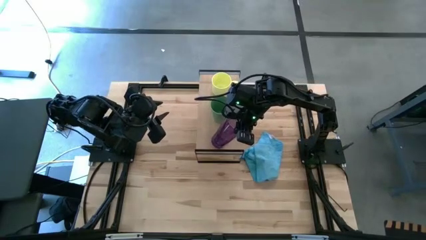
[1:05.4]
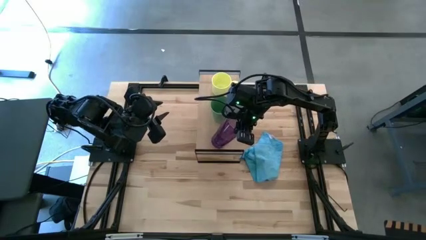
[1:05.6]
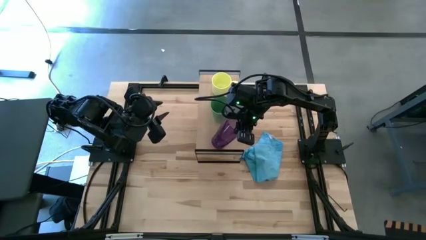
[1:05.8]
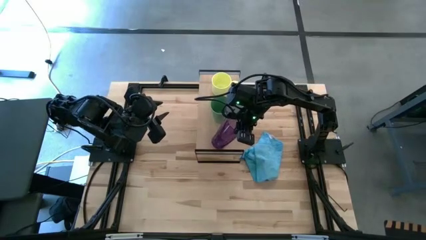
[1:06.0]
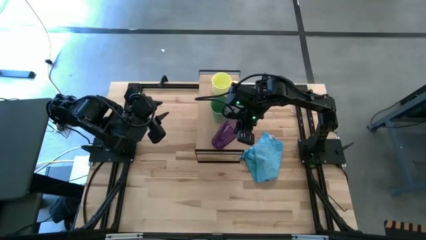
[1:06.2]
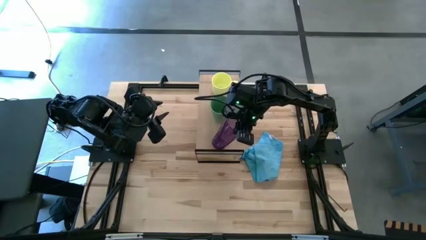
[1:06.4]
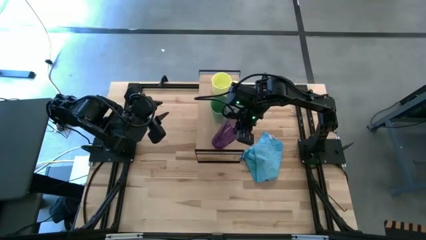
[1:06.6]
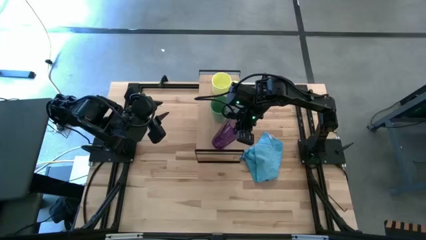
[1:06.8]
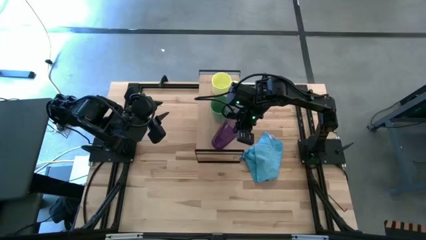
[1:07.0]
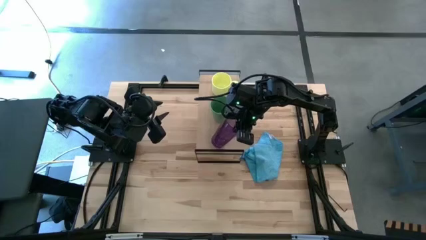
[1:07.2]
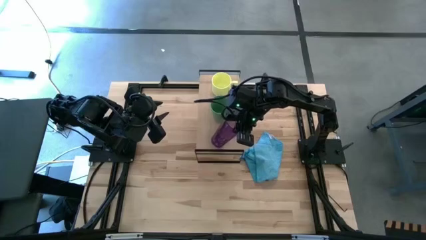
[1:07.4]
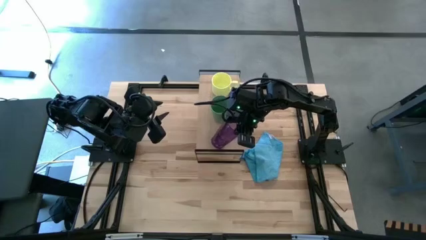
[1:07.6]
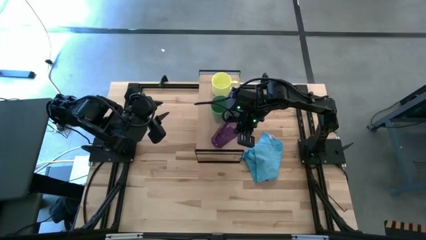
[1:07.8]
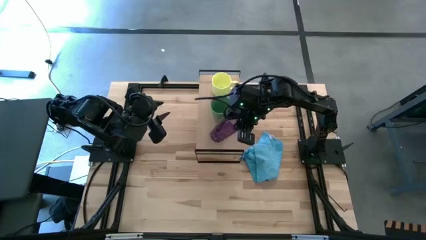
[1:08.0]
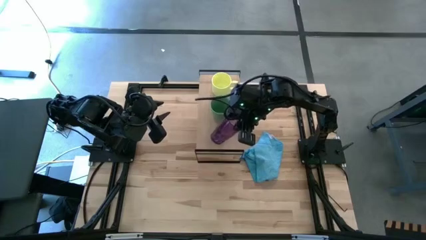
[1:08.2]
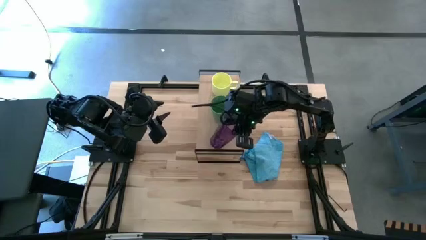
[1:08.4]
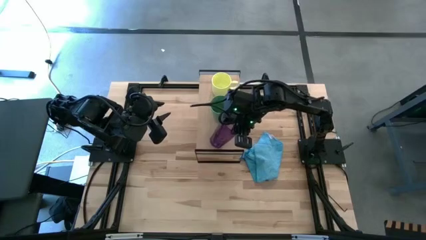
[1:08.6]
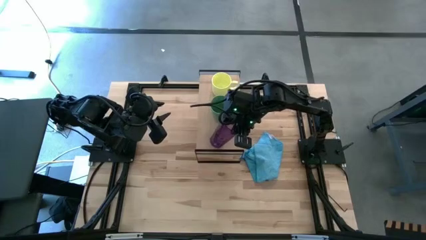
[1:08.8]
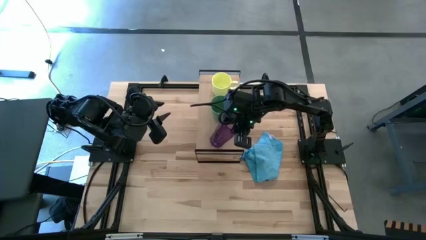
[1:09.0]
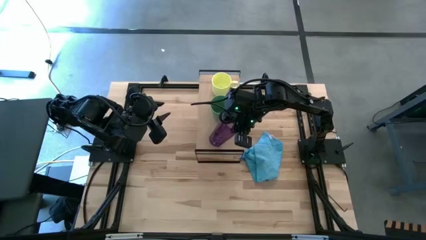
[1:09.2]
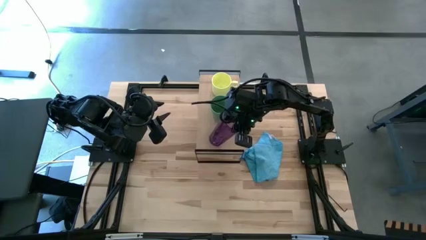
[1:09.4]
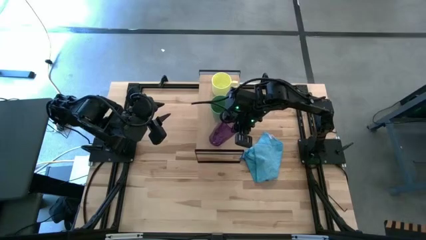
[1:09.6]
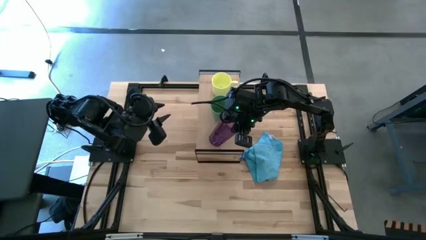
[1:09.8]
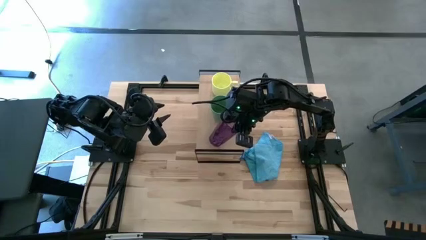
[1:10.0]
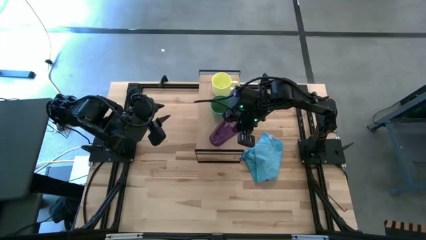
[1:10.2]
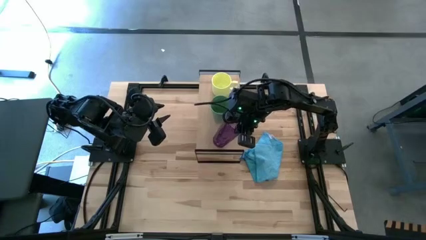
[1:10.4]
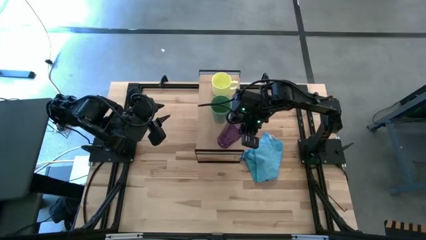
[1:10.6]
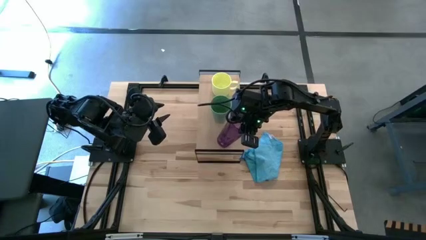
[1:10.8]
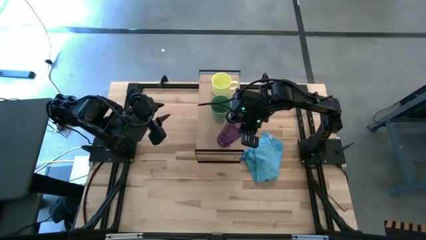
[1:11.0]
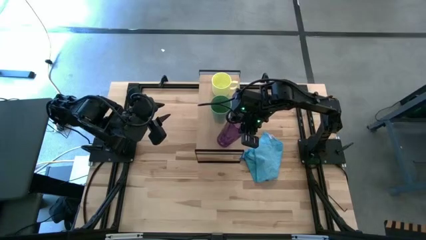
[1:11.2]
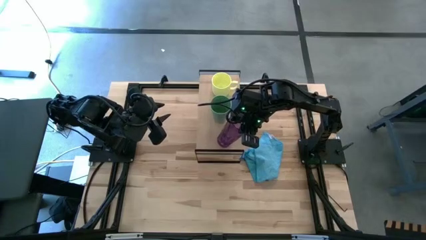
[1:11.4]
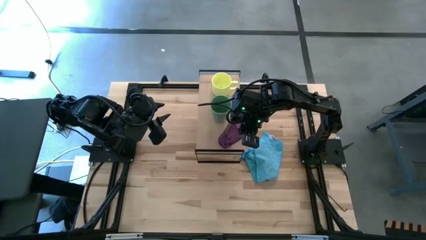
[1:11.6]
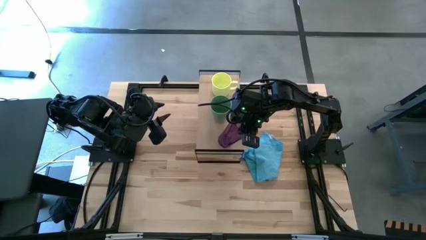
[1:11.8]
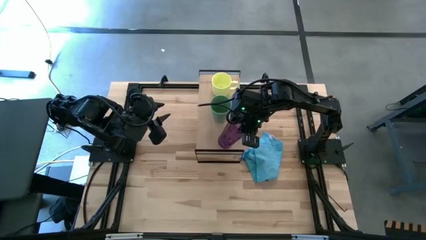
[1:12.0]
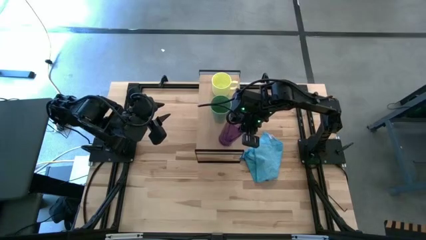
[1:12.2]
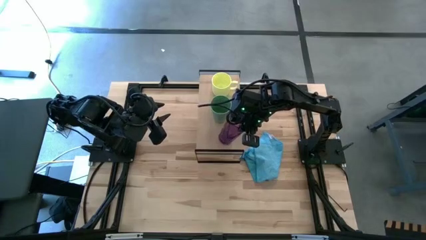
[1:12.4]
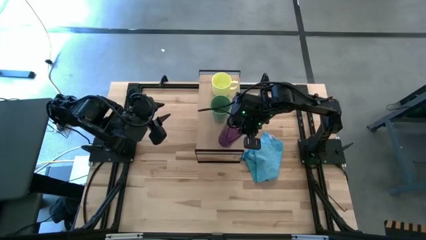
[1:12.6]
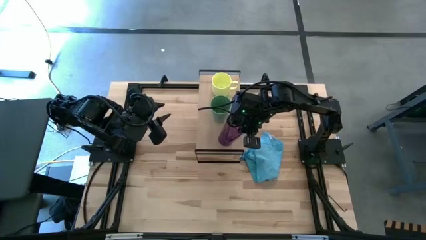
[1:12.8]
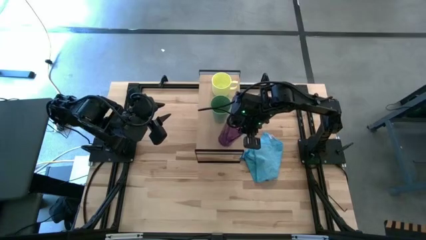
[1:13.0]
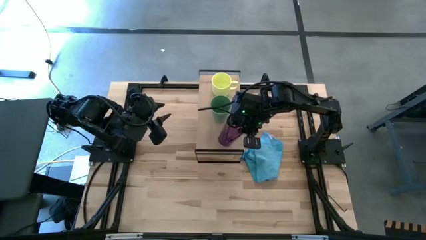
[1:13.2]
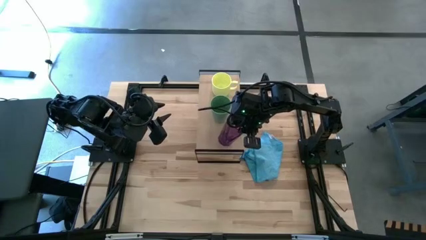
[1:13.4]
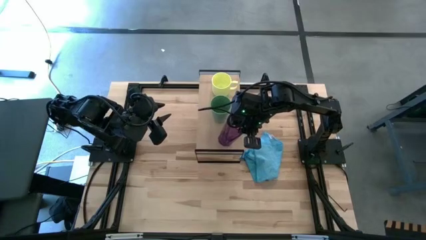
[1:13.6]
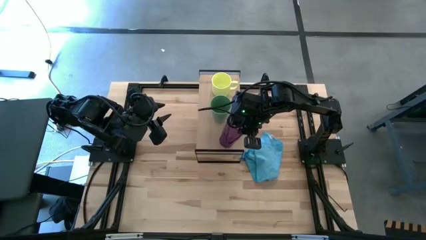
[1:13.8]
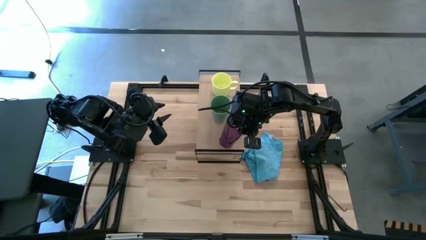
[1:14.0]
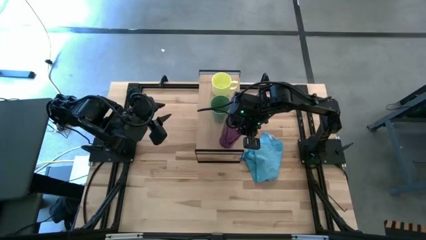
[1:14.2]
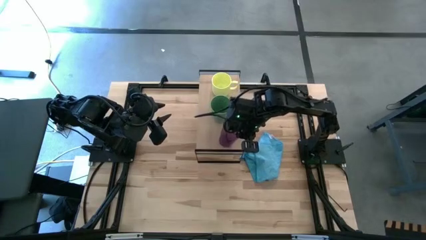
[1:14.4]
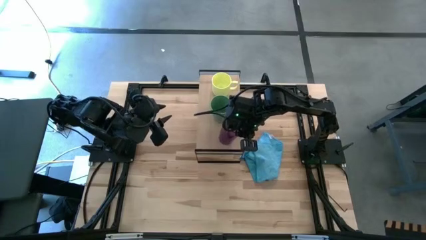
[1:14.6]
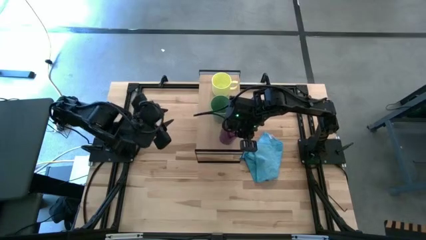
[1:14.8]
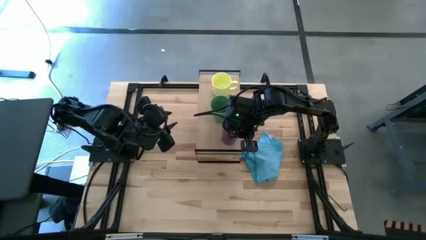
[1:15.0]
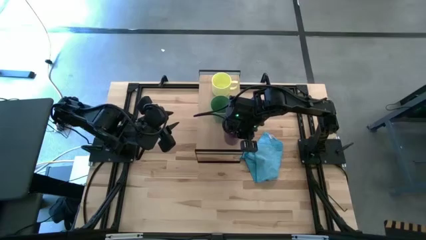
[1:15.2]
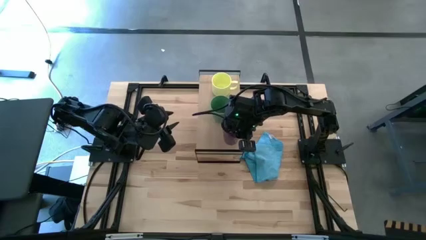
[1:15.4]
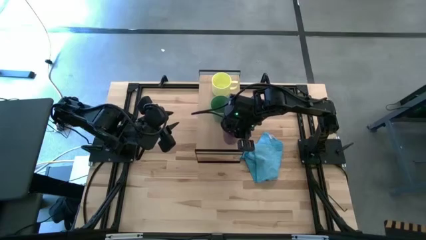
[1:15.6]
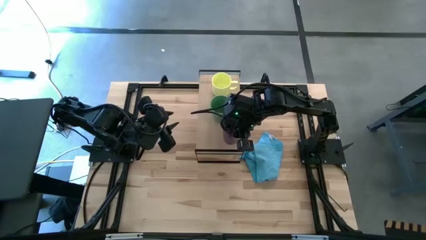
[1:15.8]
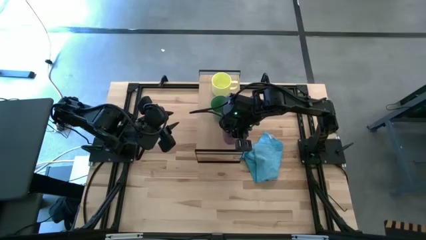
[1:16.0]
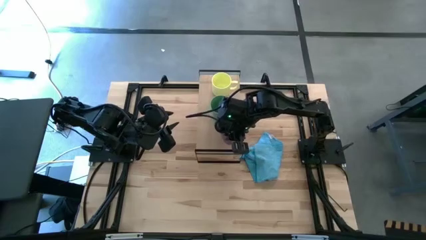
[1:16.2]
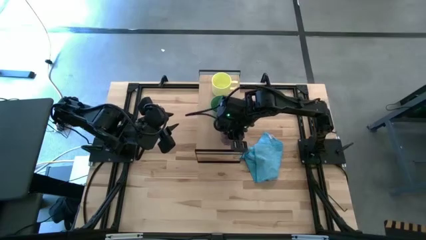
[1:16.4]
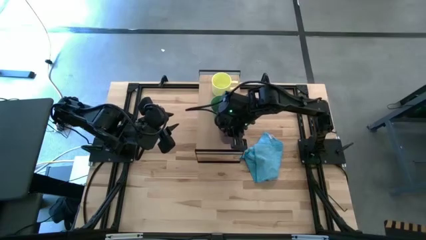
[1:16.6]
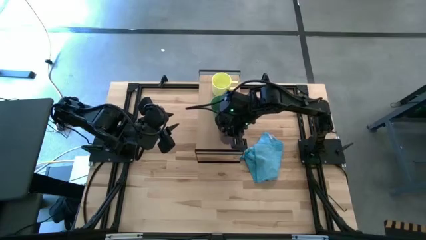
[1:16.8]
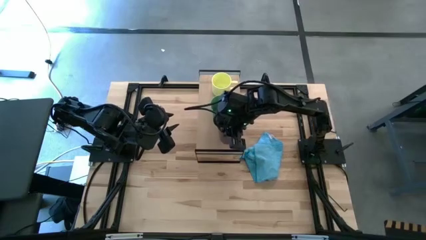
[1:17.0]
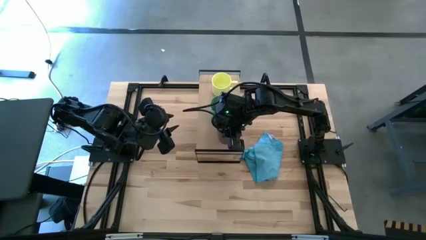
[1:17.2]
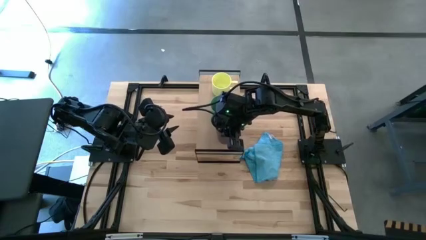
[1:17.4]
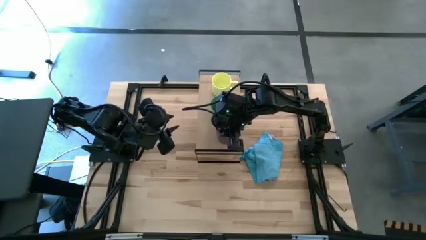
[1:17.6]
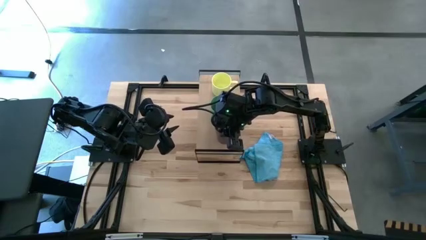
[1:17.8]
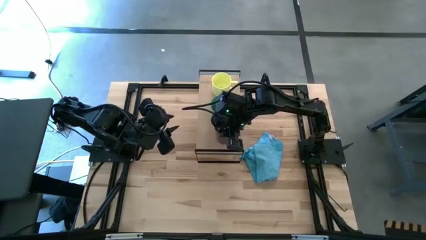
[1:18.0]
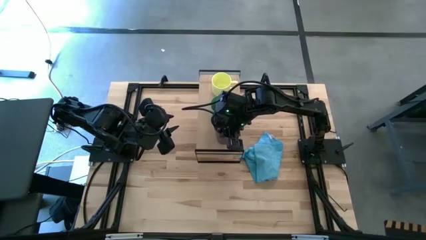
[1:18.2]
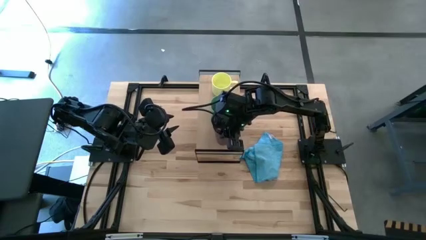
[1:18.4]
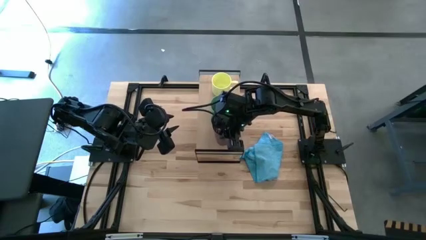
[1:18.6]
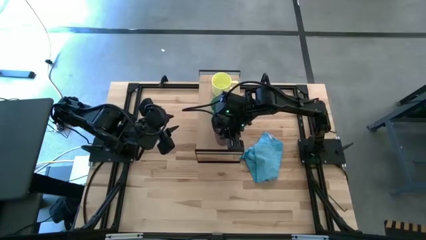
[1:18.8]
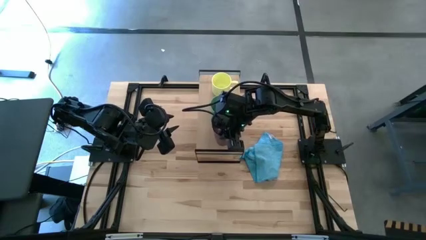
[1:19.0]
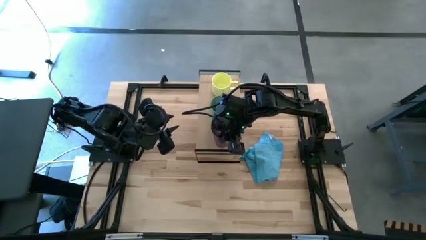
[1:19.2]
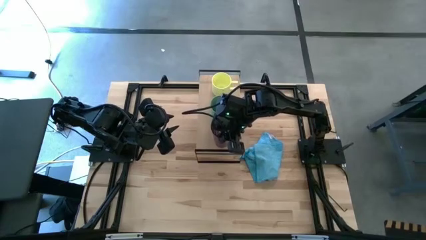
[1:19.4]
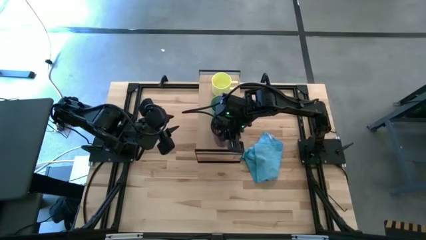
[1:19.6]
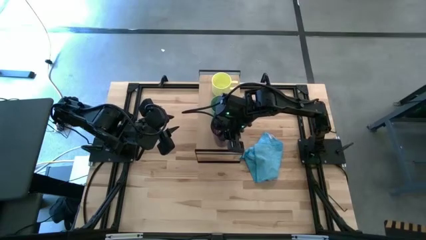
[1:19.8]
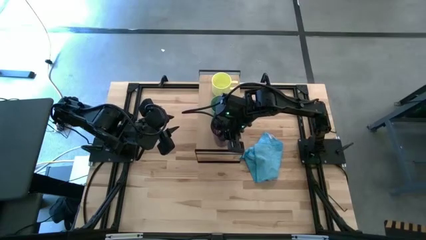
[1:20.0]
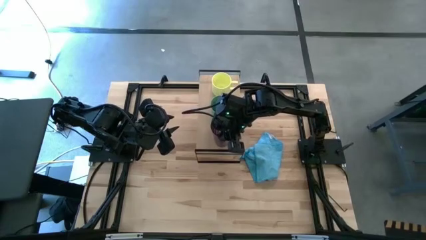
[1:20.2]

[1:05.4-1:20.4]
Task: Stack small to large cups/mugs on shelf
Put the purple glass on the shelf

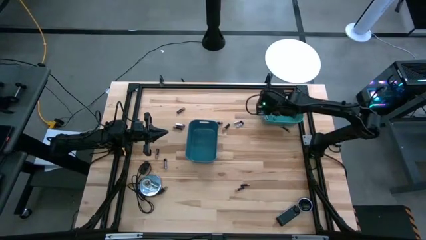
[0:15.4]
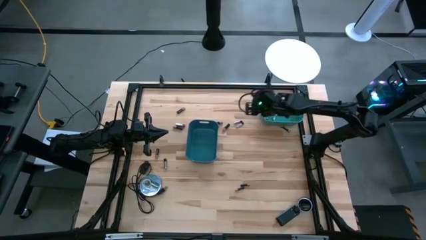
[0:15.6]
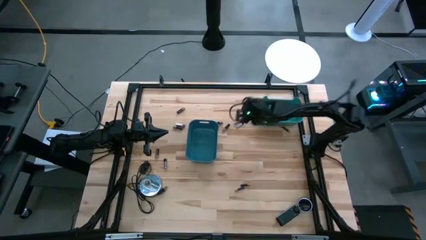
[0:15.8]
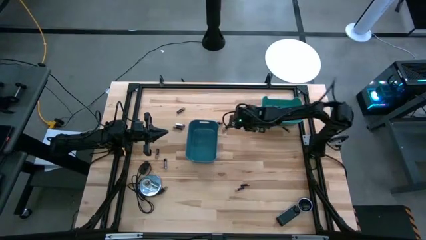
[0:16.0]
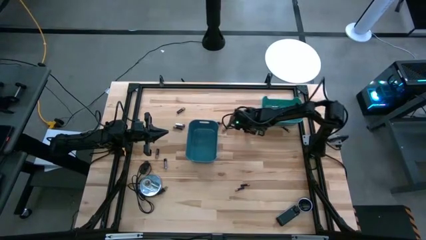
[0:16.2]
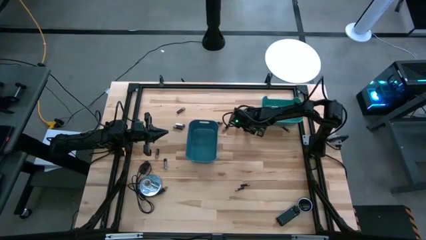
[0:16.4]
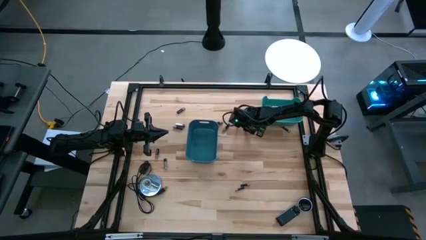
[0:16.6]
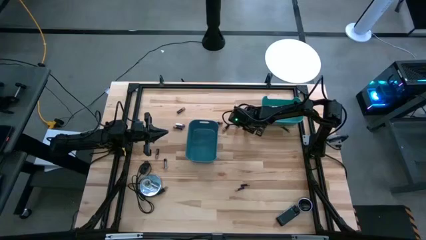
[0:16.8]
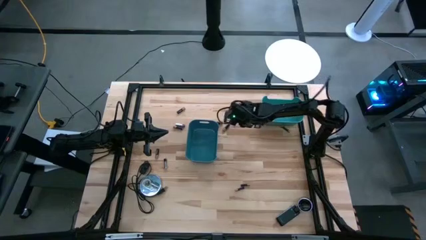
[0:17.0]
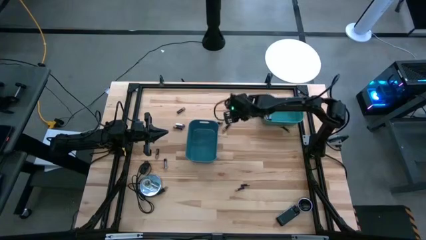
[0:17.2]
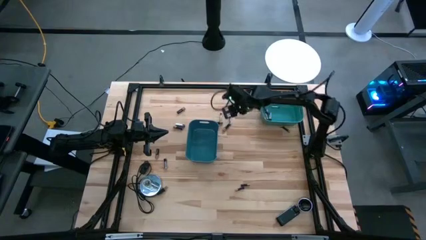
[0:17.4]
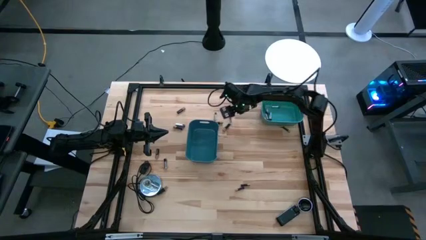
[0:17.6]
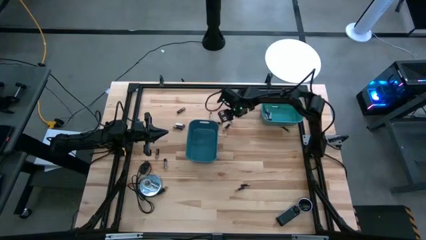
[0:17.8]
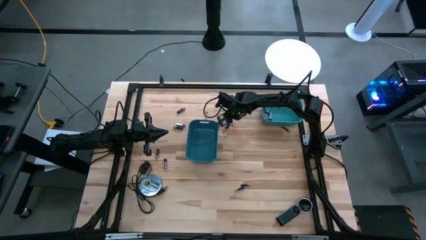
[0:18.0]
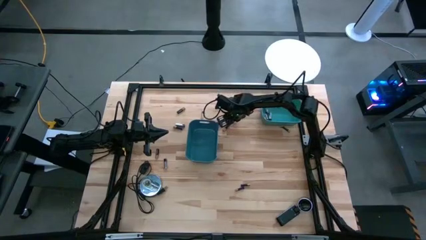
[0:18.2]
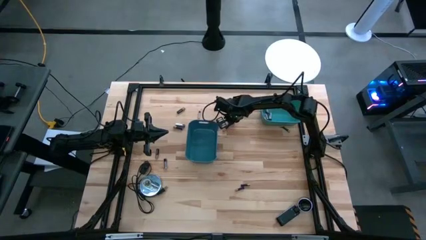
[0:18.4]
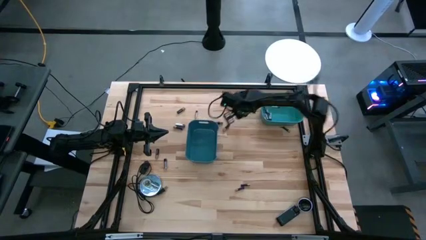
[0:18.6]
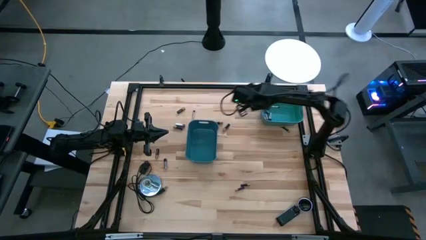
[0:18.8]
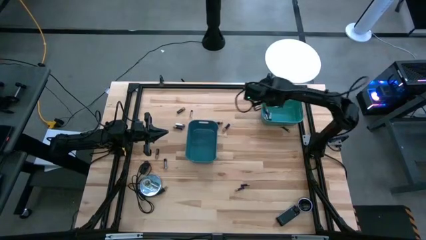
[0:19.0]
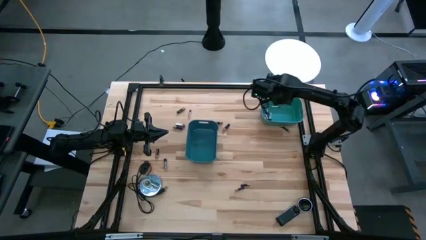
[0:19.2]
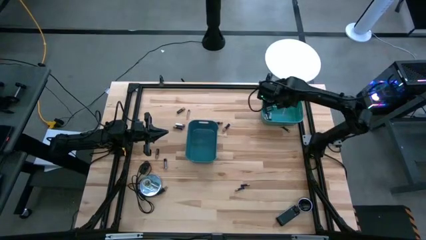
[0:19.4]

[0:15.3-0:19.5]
Task: Sort batteries
Put the silver battery into the green bin
